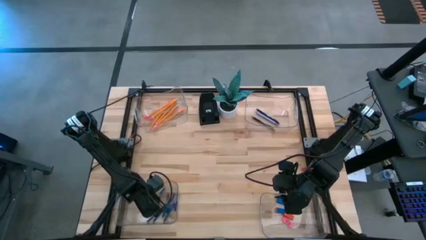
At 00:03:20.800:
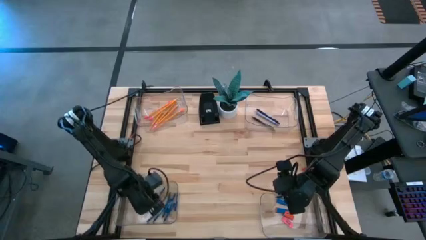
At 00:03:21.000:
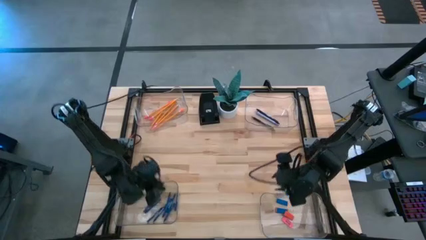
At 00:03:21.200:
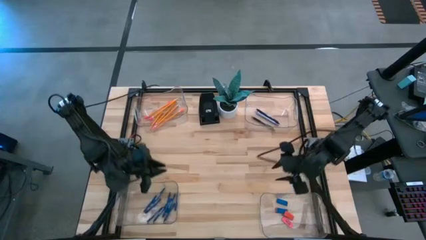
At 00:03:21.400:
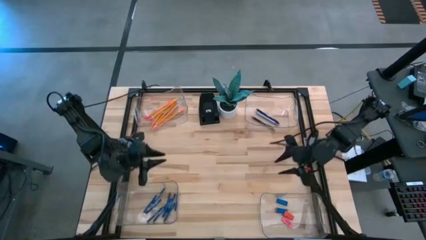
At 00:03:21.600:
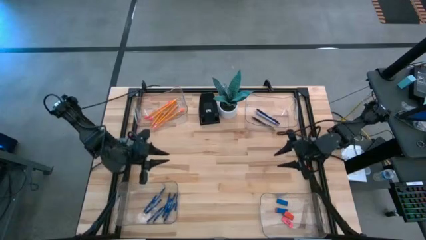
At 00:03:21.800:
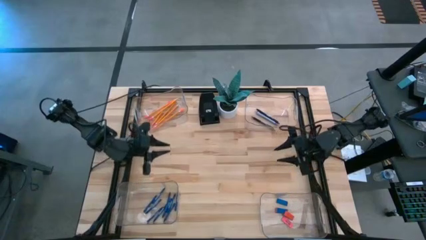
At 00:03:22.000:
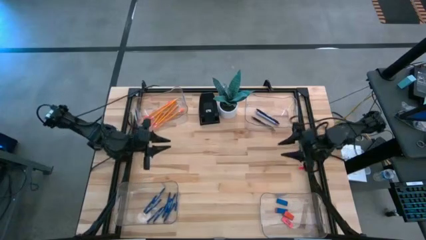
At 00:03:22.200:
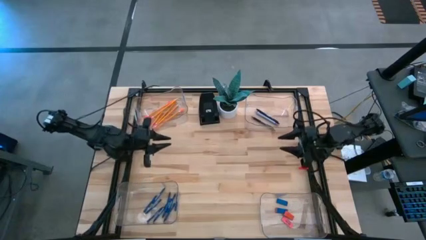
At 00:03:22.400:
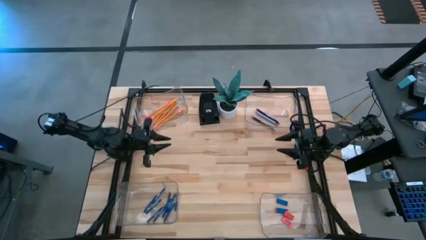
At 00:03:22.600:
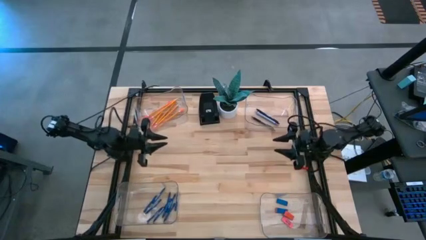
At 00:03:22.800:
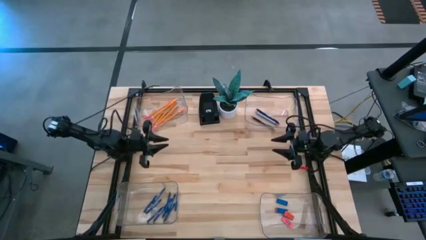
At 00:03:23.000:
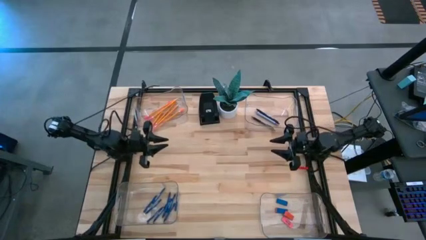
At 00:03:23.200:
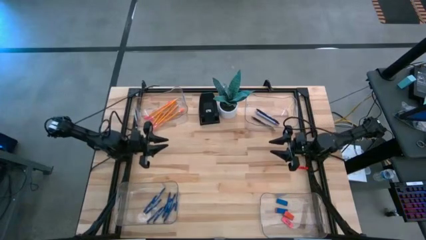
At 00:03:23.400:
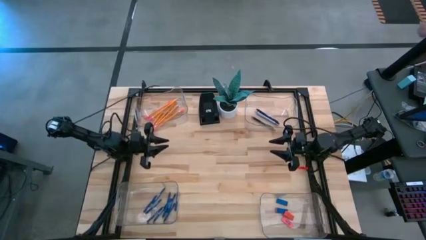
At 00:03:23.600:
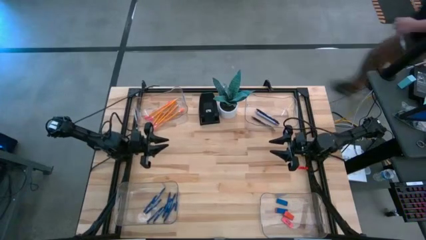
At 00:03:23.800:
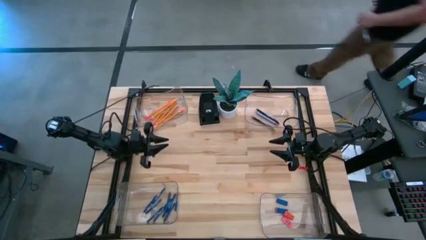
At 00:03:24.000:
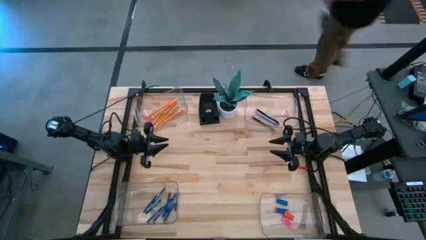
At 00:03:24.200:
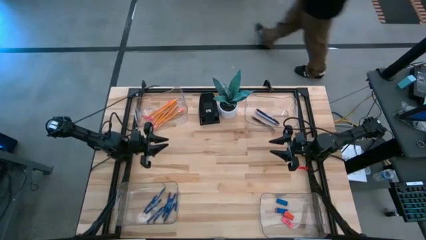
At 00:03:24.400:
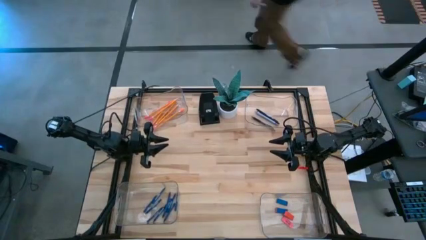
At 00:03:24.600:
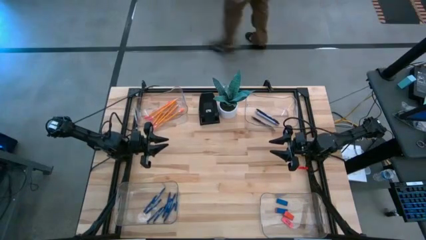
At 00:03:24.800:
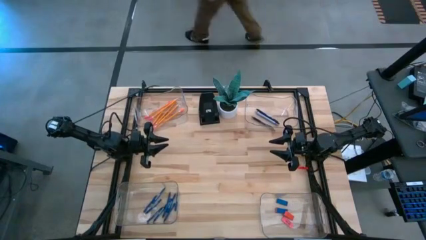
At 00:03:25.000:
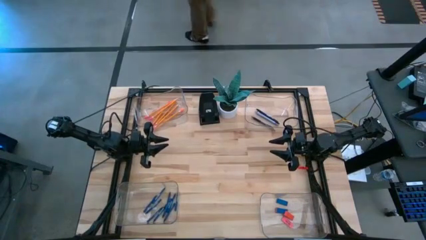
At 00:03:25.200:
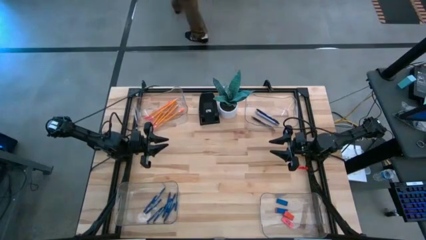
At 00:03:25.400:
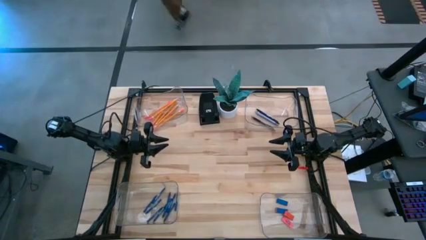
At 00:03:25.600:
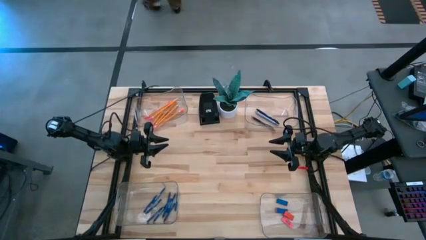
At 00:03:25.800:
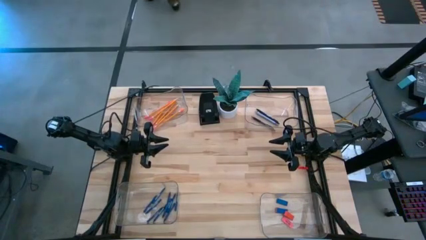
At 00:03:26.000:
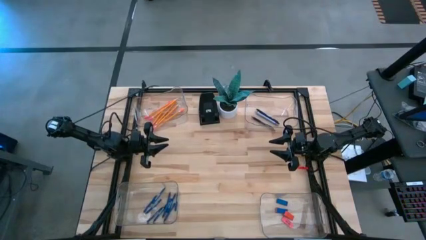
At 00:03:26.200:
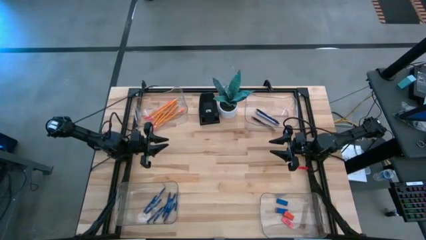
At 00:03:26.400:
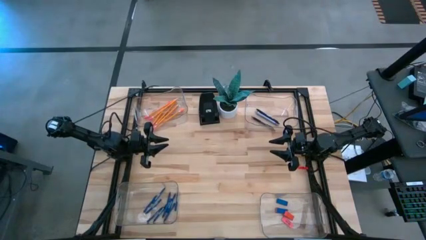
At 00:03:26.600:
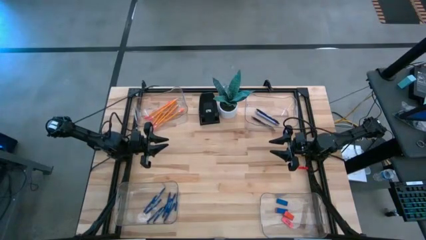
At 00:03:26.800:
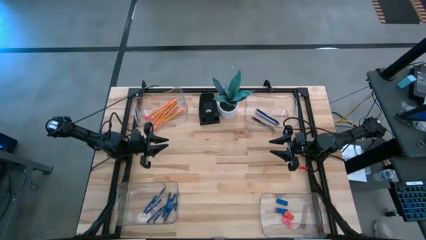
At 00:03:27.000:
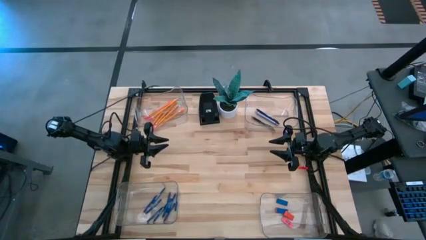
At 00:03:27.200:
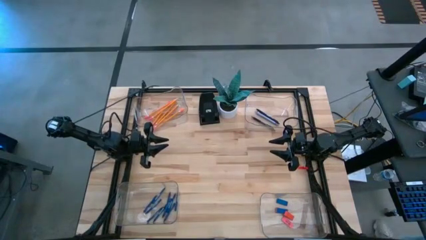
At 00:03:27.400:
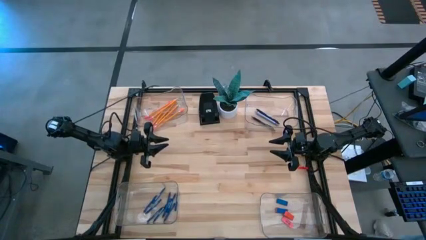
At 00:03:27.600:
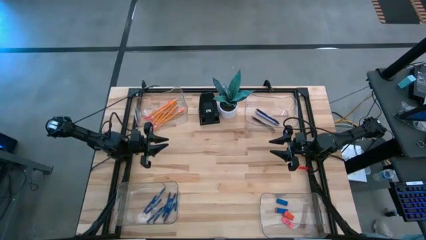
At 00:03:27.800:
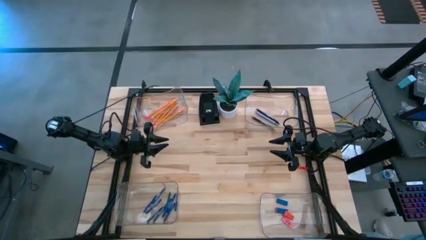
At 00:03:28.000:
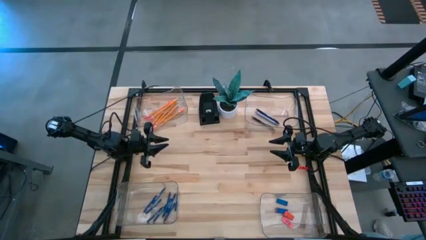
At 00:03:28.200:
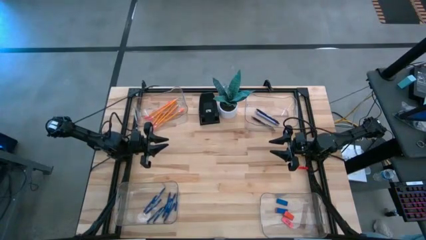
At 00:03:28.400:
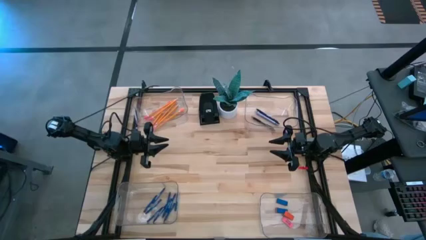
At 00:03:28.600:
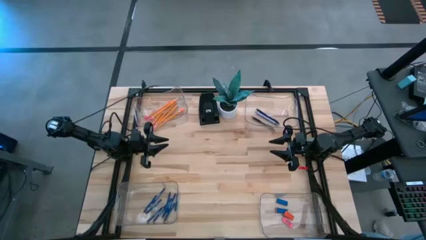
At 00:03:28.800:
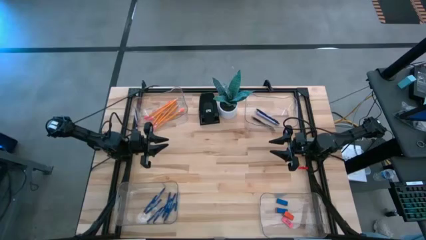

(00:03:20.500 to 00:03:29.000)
Task: Sort crayons/erasers/pens/pencils in bins
Return to Home Position

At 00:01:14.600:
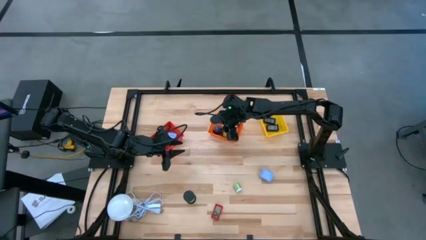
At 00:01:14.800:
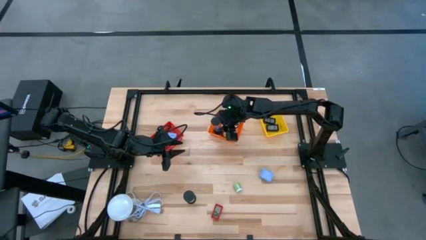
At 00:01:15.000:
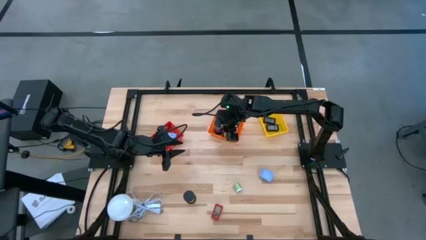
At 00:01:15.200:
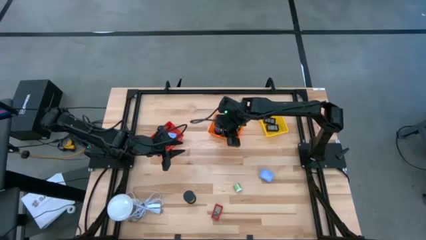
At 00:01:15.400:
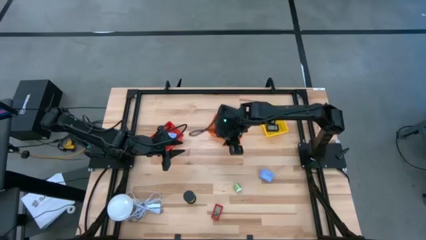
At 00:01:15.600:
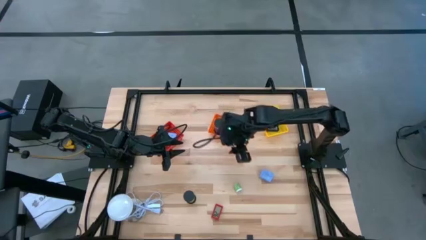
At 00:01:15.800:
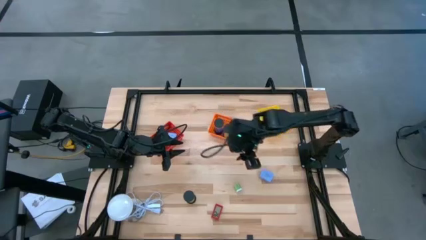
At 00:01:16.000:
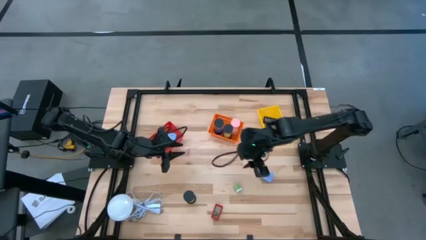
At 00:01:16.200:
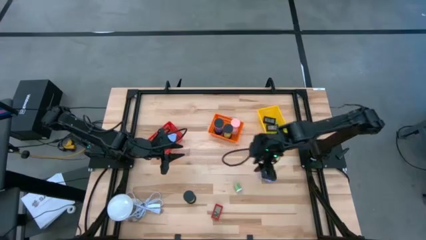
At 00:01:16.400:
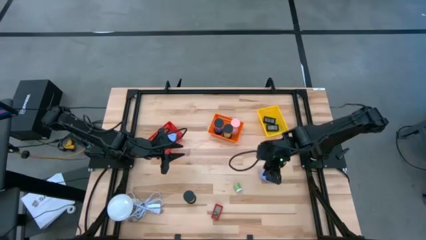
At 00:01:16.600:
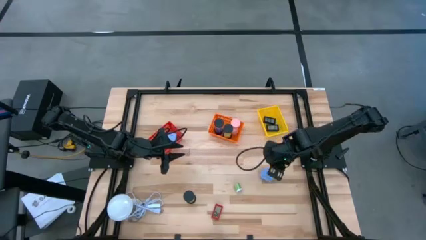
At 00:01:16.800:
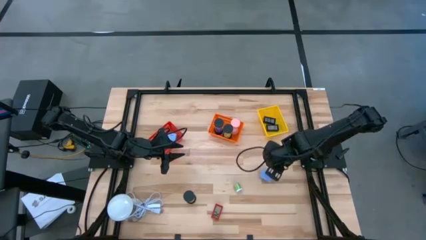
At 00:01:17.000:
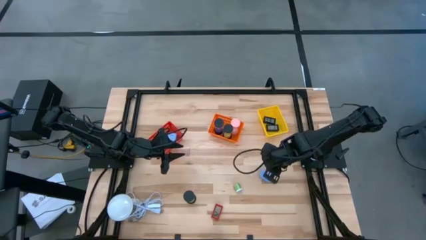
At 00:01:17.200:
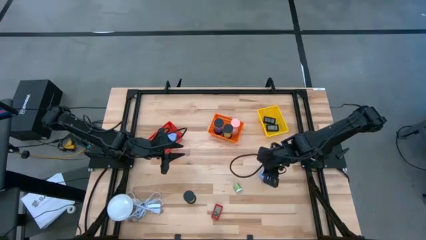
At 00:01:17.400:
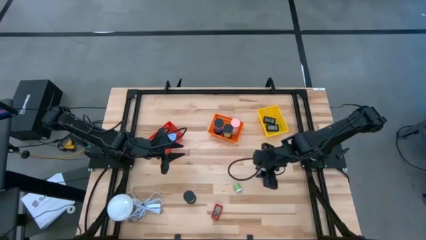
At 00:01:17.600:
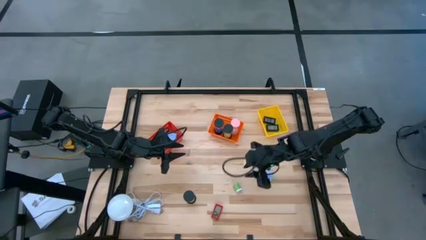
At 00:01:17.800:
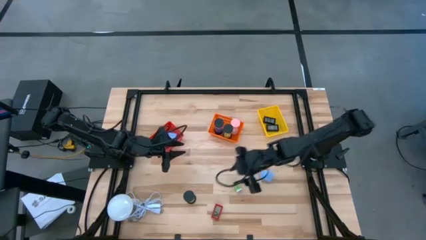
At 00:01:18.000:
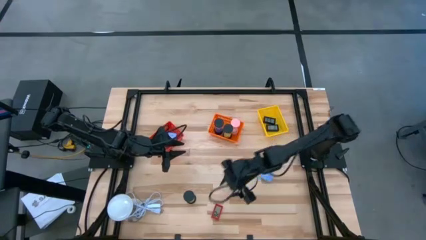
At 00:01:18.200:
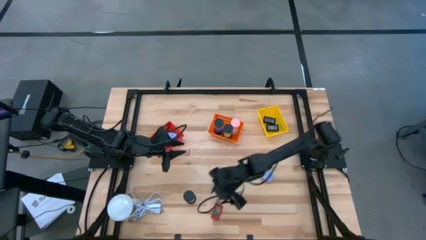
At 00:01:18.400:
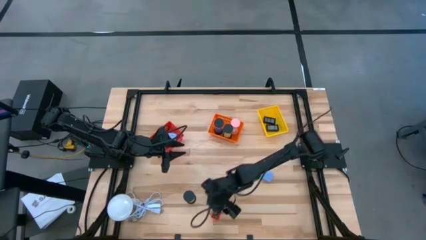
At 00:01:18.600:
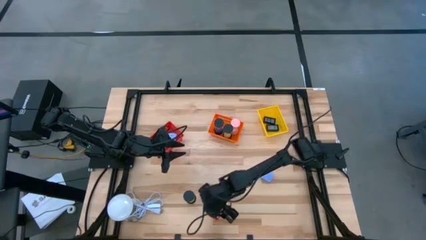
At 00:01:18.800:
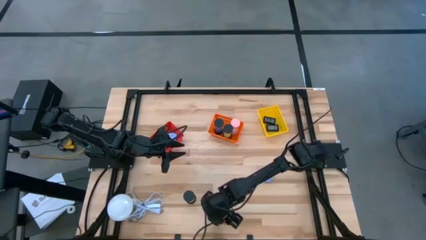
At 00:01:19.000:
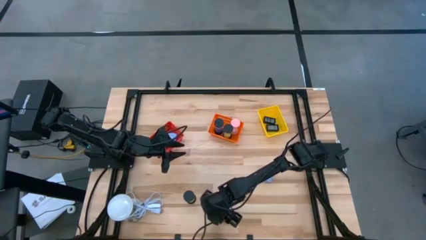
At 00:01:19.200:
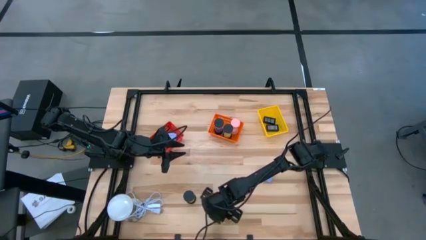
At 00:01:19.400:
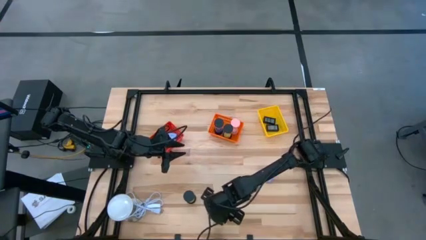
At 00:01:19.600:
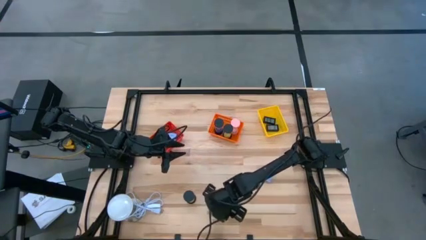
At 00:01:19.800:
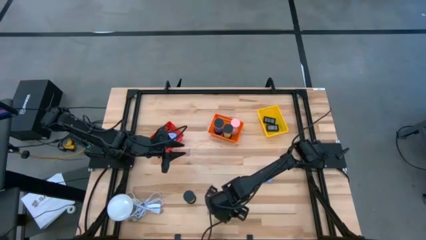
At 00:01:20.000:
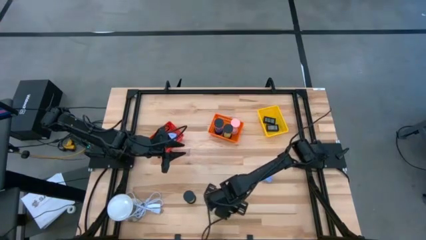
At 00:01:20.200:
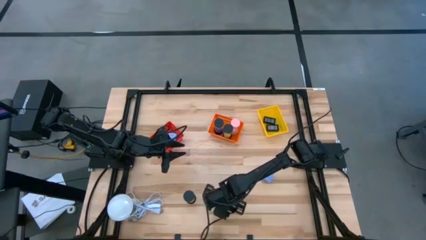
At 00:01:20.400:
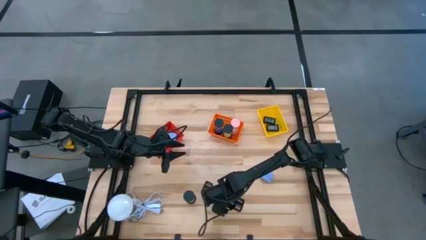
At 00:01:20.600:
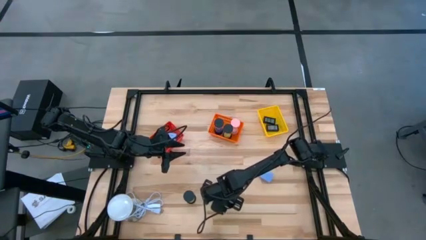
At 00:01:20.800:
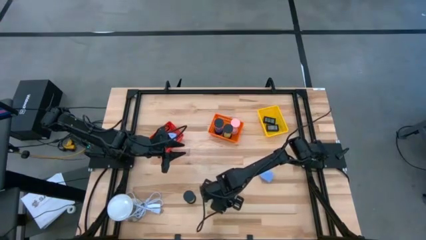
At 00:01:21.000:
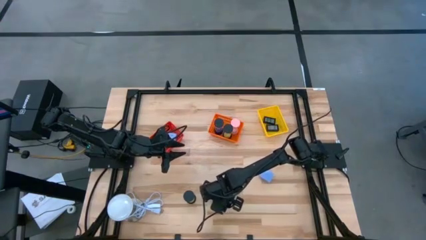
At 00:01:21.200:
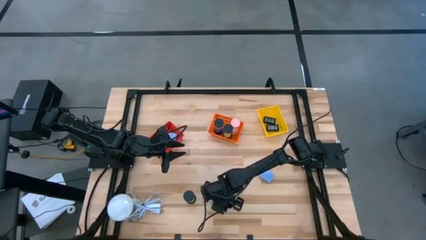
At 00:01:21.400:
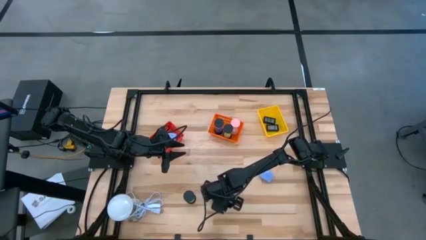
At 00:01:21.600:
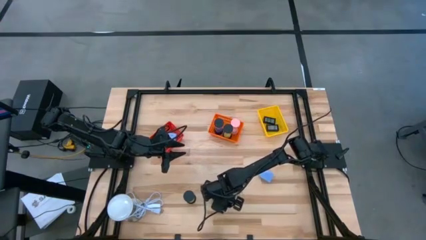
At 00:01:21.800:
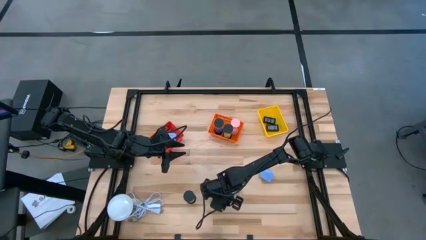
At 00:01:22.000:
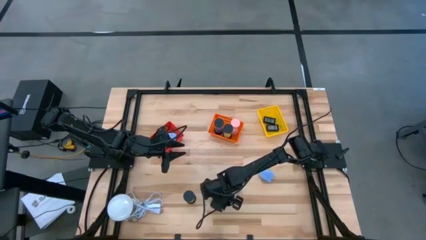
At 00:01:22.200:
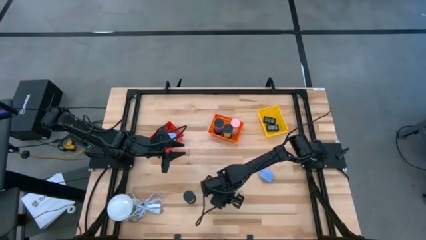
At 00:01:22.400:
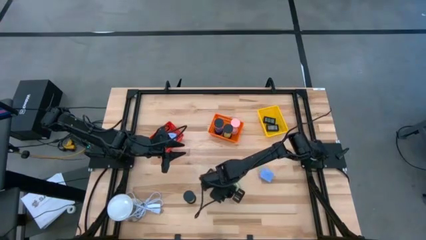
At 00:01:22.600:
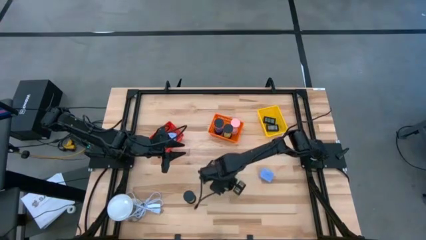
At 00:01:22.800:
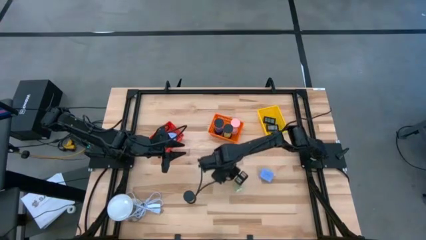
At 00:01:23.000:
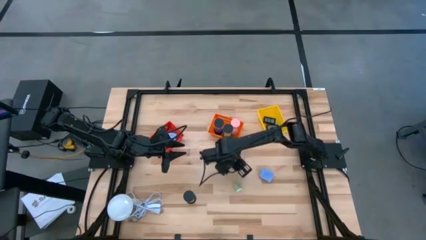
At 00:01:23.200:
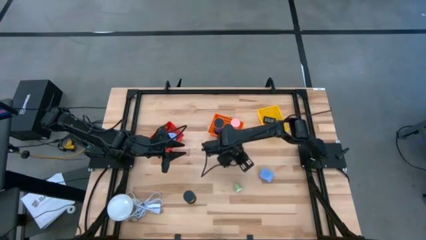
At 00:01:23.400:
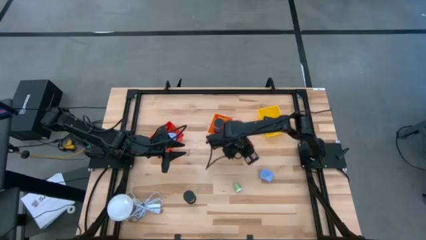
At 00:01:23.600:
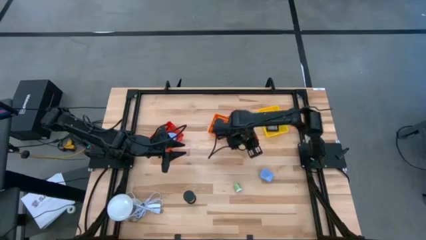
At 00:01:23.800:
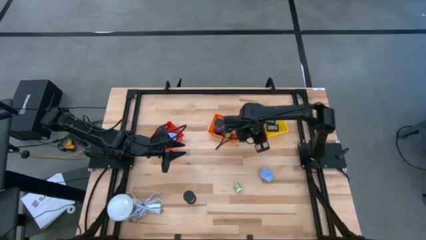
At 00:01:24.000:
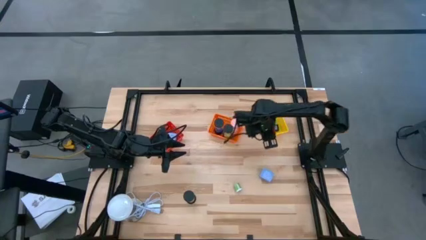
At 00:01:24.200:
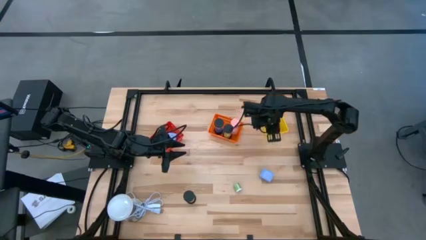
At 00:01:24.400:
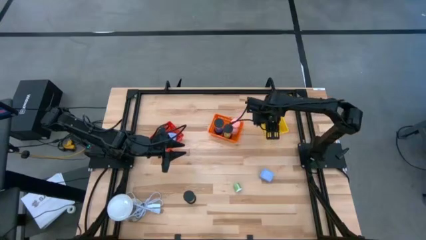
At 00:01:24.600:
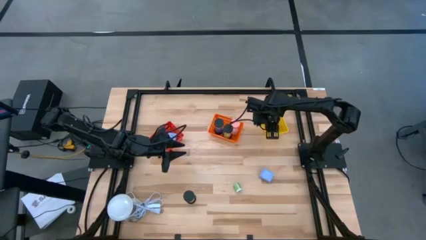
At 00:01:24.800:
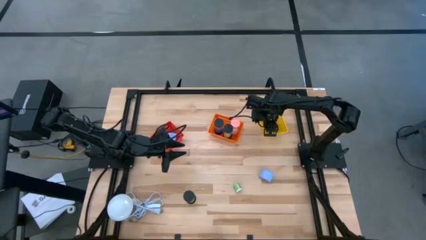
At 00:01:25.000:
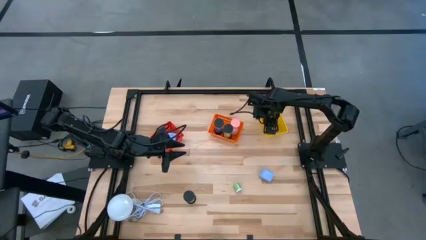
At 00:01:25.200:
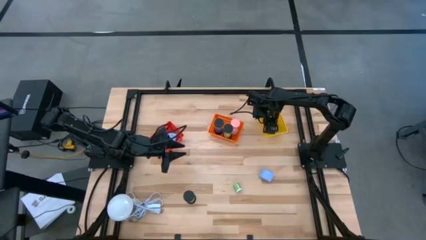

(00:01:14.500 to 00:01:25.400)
Task: Pick & Place Office items
Put the red digital timer into the yellow basket
